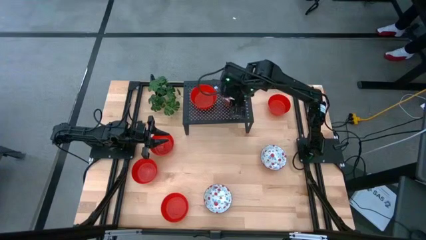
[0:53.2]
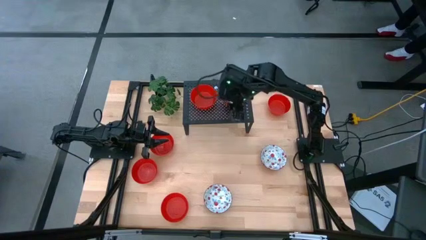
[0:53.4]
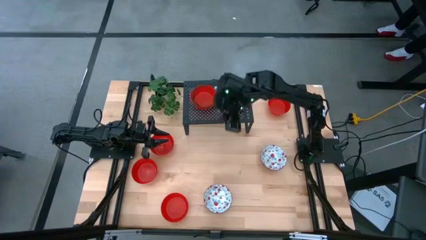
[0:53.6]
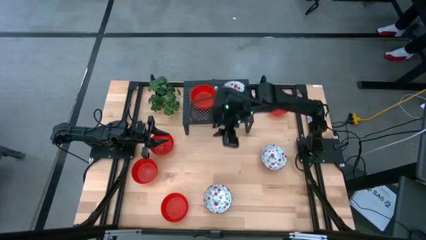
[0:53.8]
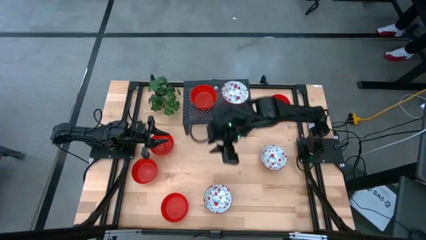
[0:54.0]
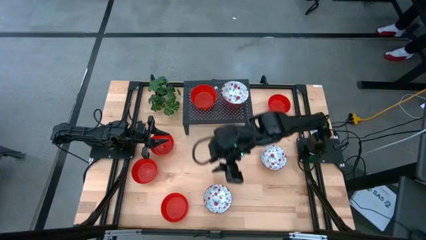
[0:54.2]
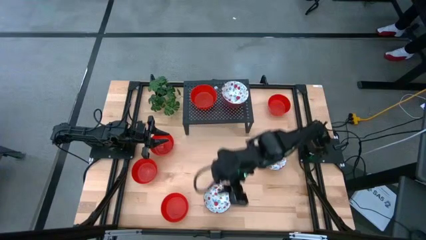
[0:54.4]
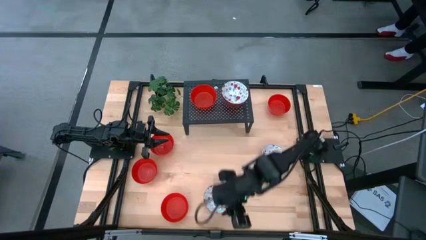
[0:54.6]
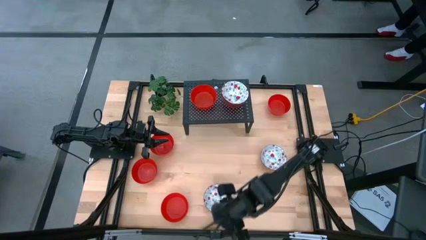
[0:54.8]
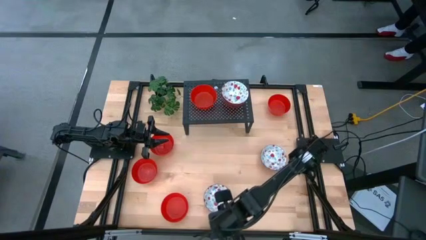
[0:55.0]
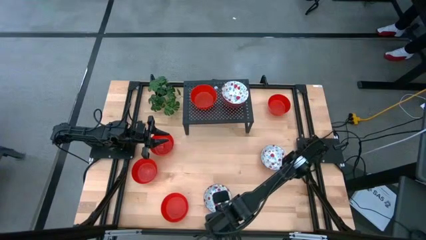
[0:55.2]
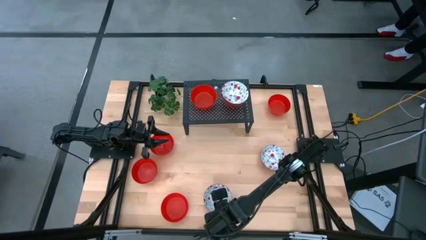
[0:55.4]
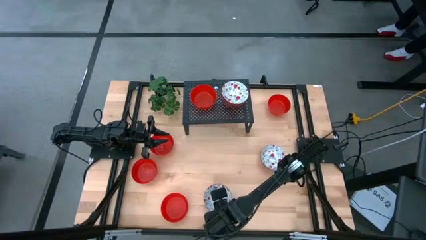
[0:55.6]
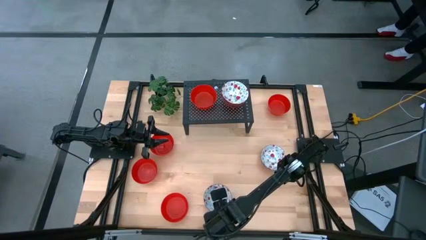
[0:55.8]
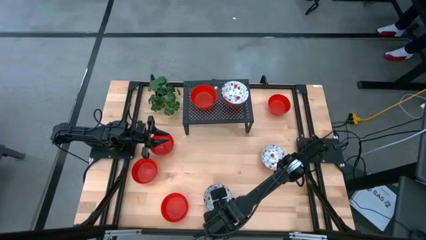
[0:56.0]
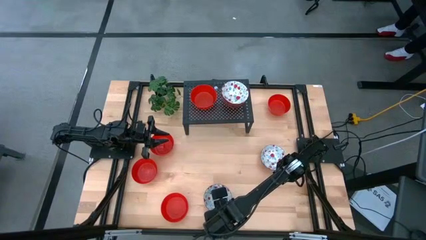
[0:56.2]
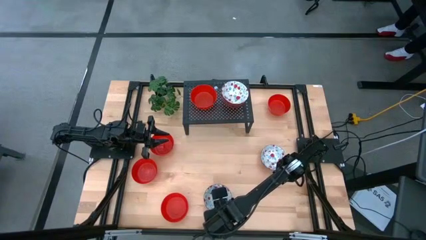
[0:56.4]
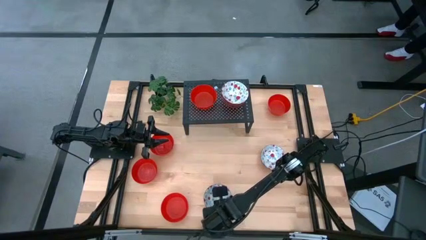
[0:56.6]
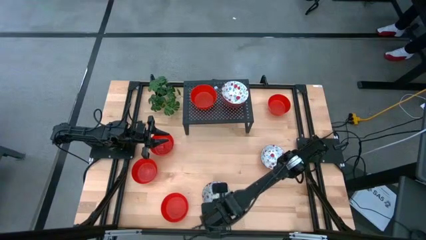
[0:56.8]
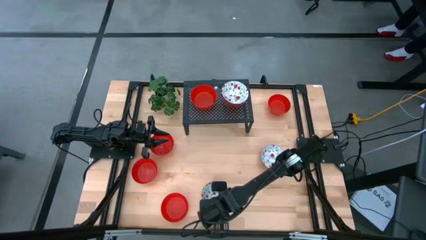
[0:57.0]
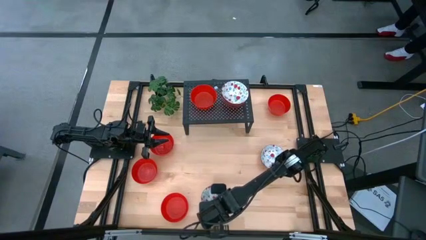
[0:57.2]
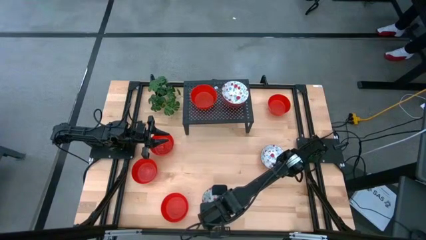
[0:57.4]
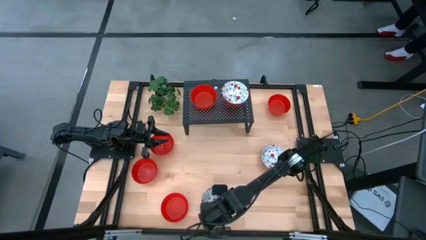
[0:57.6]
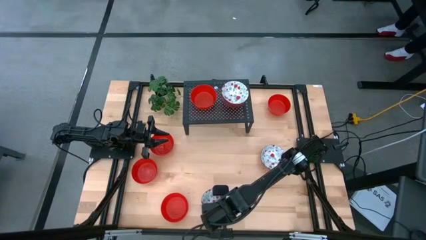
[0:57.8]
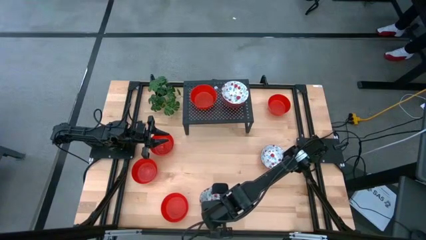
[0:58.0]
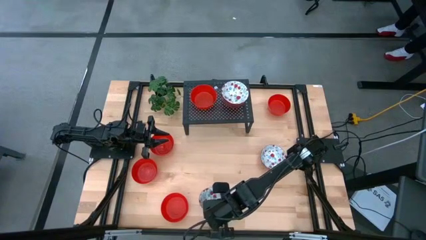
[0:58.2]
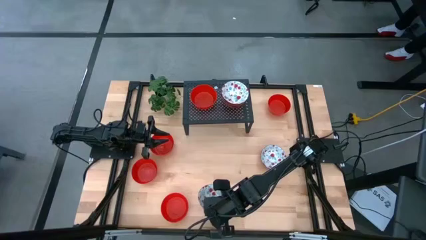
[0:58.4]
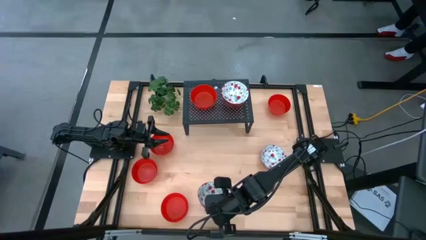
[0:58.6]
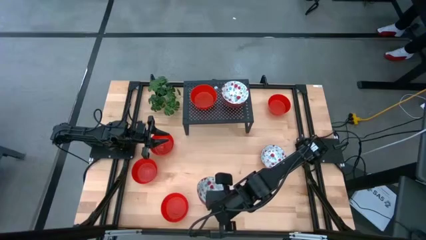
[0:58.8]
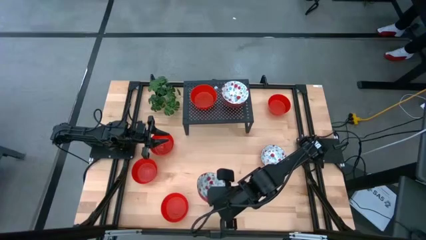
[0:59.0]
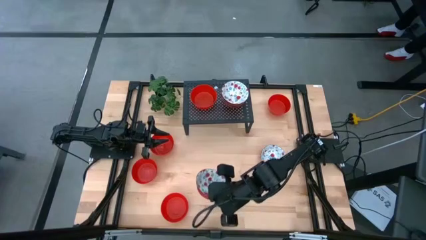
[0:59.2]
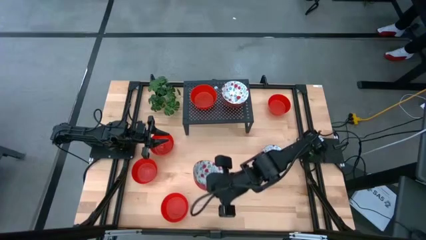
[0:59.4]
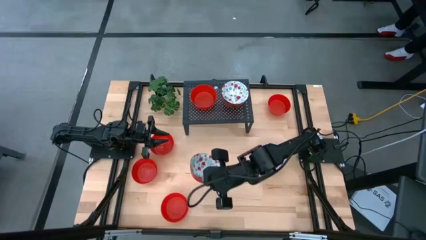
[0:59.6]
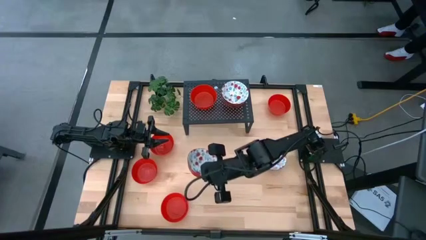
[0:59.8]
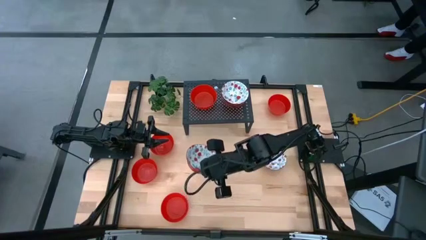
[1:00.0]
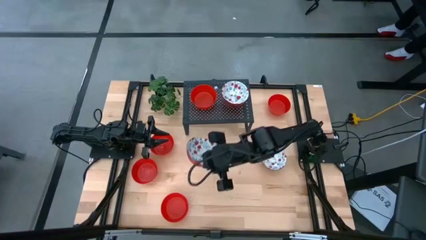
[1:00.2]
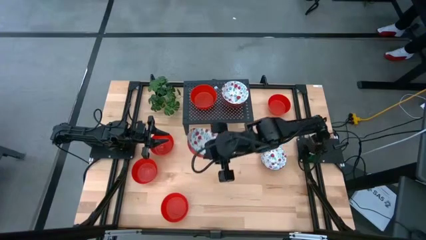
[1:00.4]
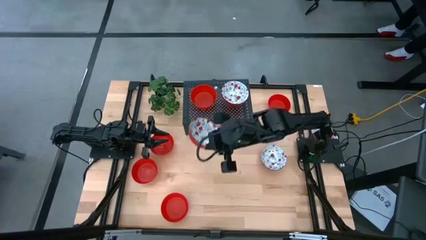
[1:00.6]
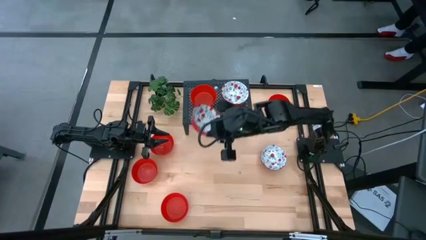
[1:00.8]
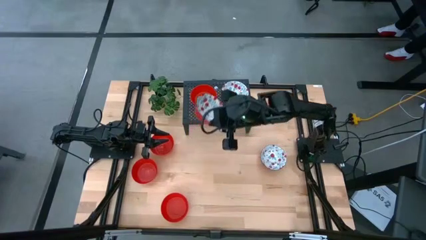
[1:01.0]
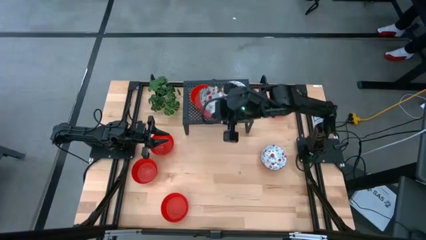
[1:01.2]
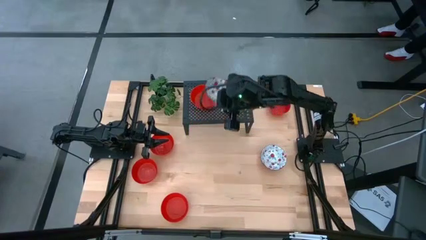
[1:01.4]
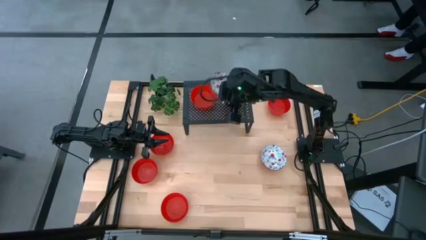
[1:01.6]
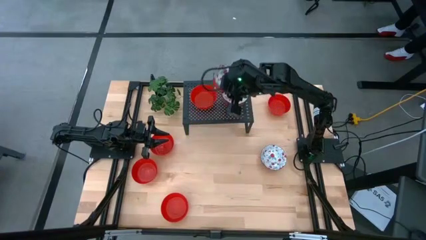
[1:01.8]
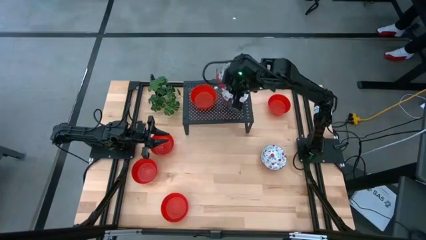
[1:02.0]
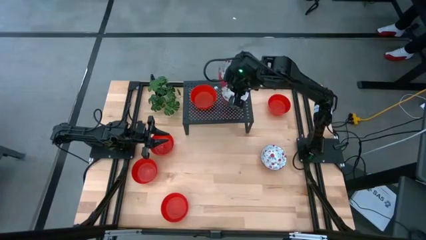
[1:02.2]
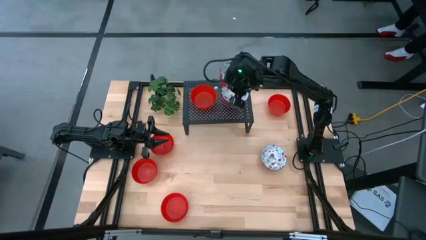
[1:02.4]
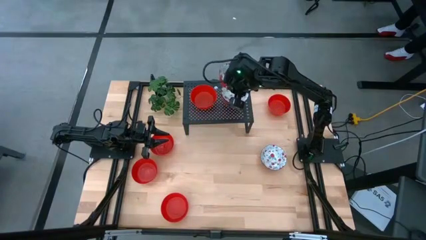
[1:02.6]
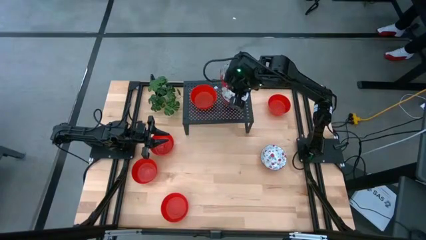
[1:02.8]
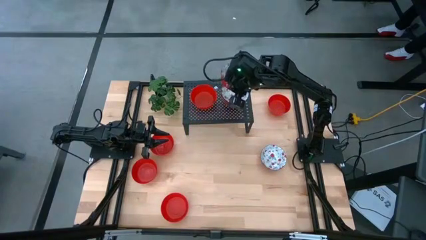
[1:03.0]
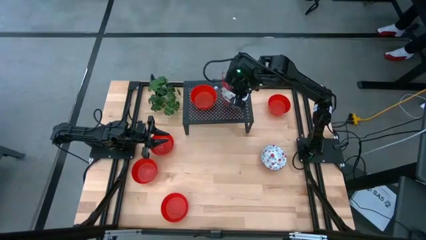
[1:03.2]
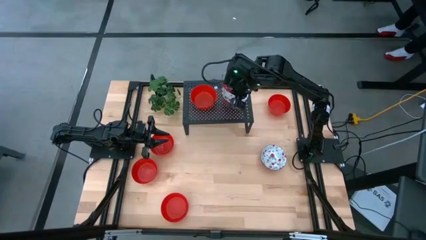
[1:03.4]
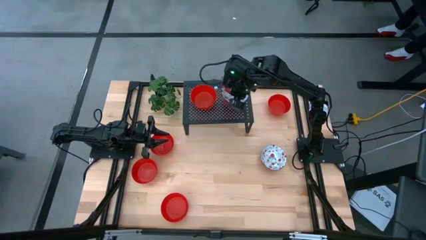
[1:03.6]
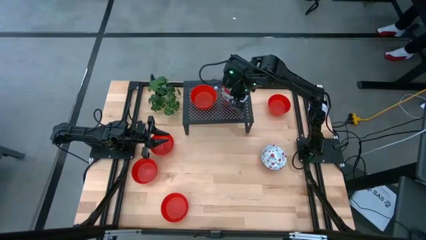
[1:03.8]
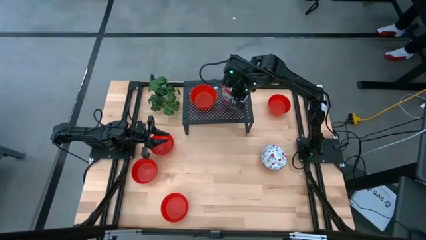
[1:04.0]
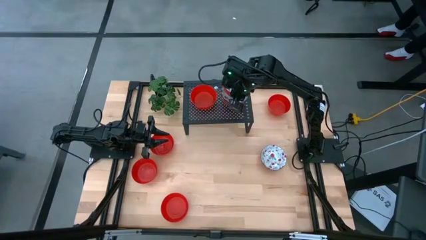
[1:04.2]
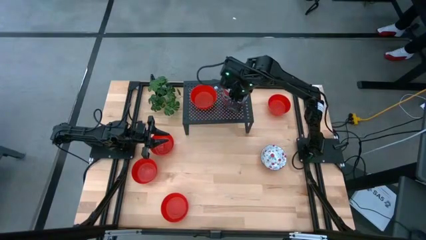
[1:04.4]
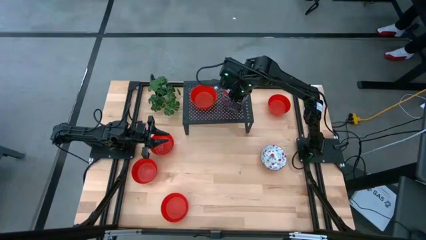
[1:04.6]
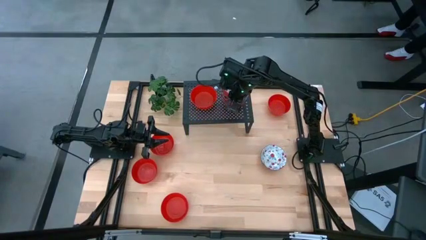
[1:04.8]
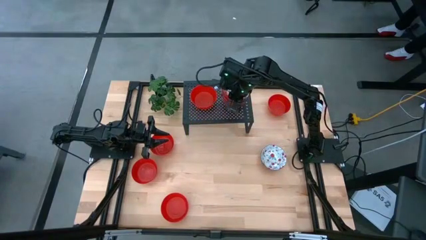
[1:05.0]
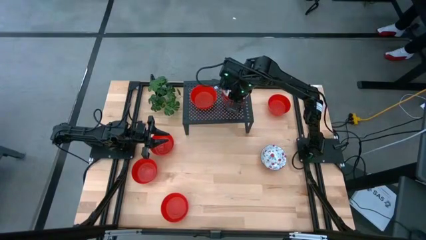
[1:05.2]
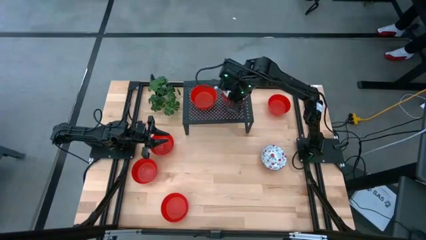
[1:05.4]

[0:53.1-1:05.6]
Task: Pick & Place Mini bowls
Stack the bottom white bowl on the top of the white bowl on the shelf
